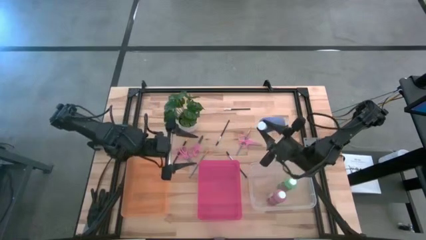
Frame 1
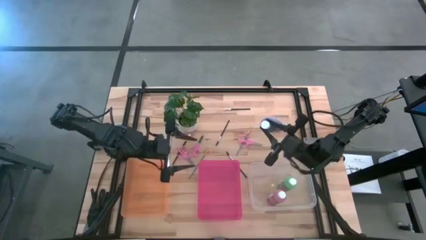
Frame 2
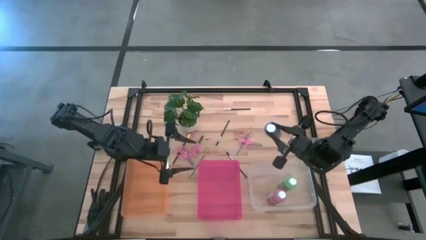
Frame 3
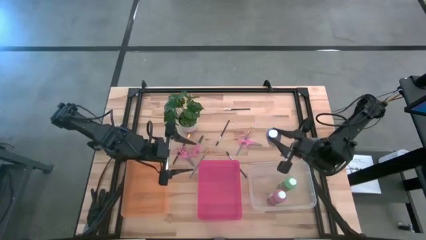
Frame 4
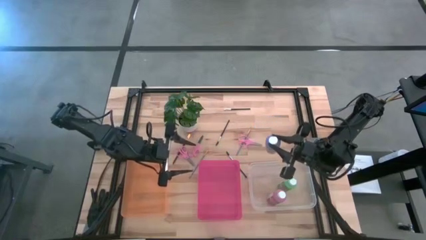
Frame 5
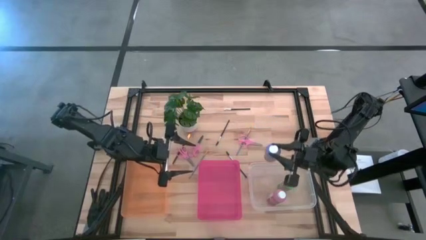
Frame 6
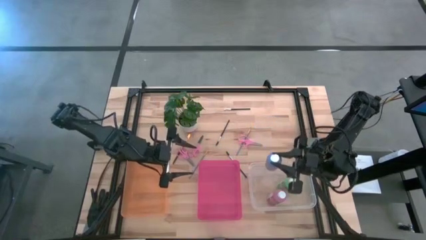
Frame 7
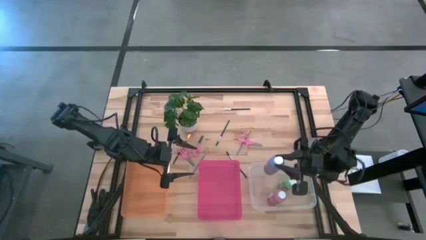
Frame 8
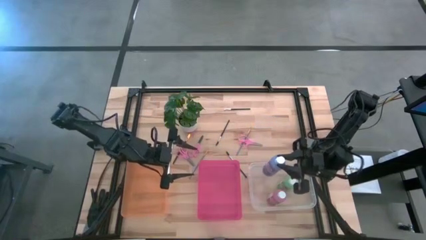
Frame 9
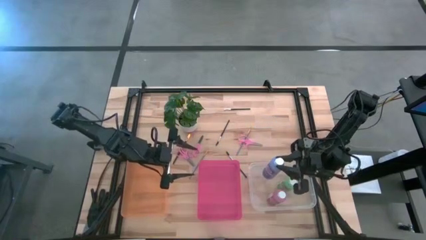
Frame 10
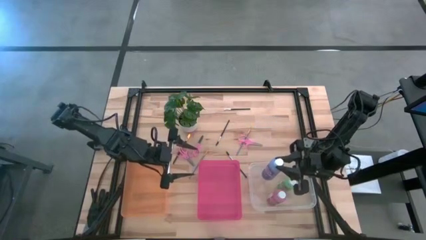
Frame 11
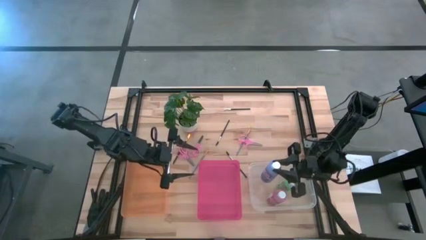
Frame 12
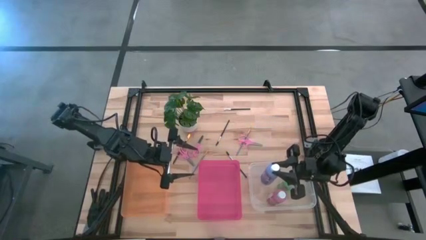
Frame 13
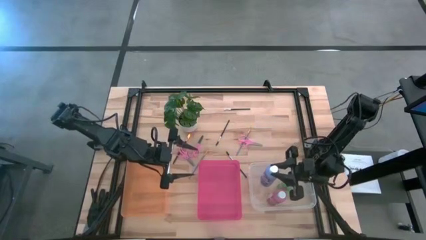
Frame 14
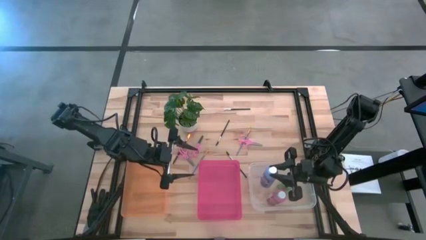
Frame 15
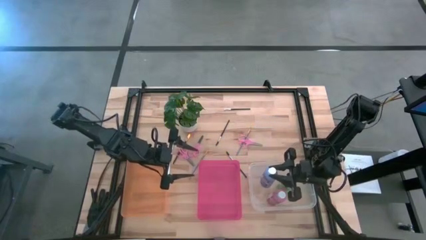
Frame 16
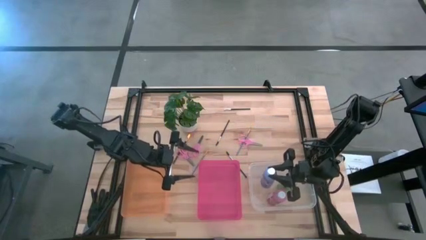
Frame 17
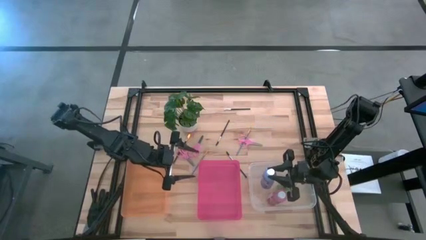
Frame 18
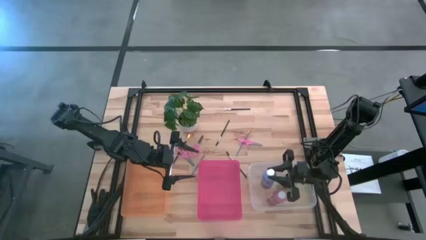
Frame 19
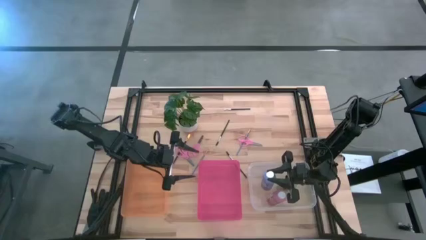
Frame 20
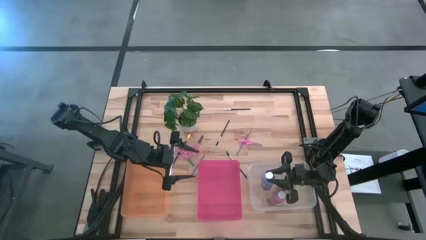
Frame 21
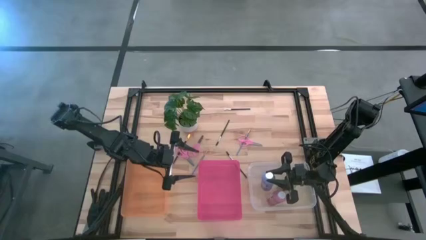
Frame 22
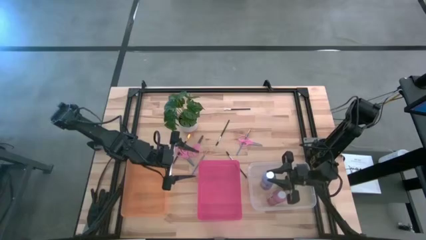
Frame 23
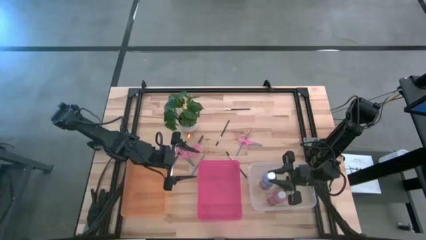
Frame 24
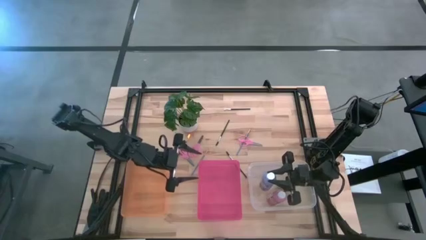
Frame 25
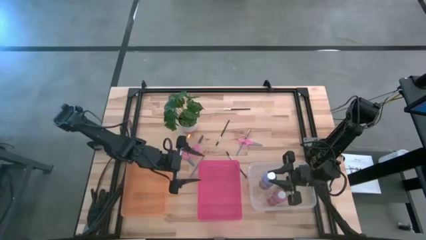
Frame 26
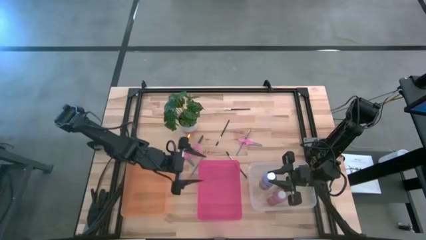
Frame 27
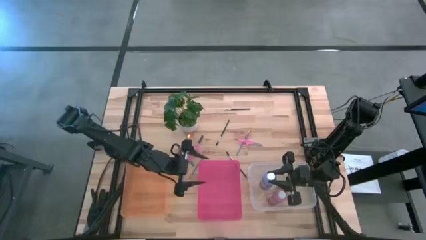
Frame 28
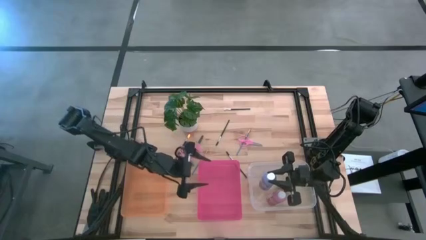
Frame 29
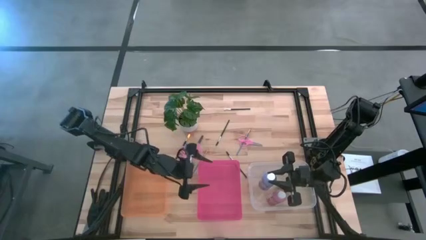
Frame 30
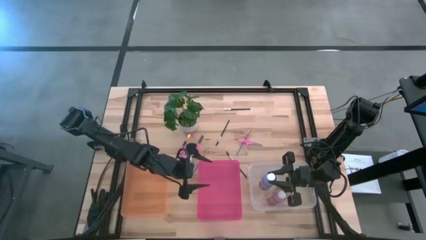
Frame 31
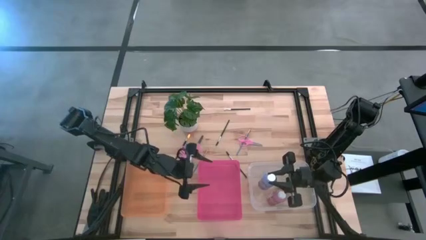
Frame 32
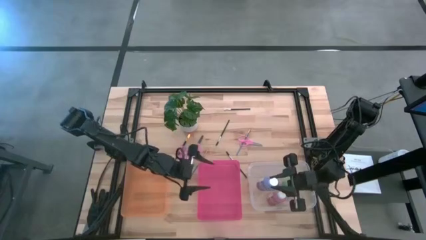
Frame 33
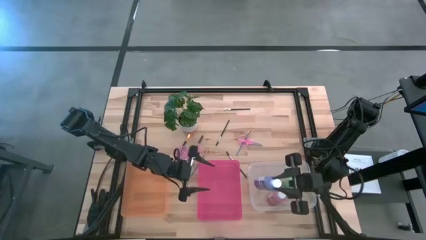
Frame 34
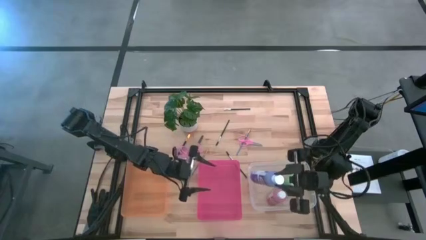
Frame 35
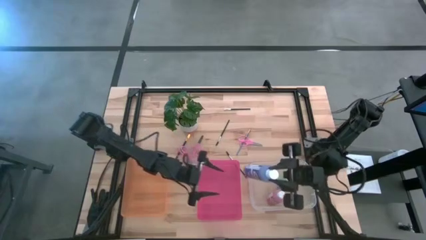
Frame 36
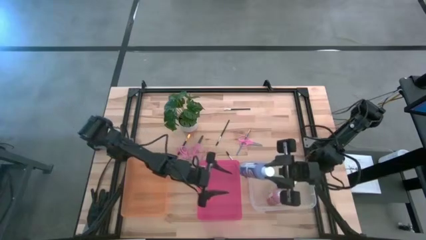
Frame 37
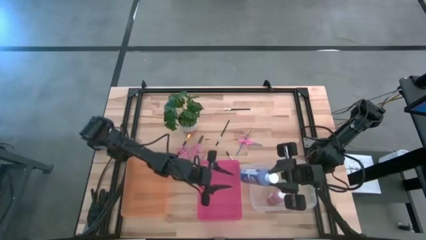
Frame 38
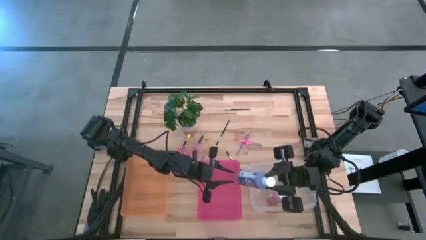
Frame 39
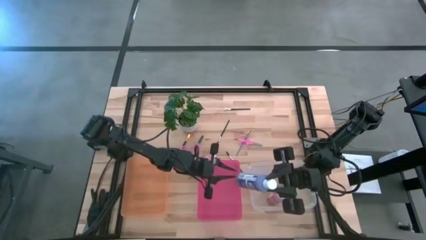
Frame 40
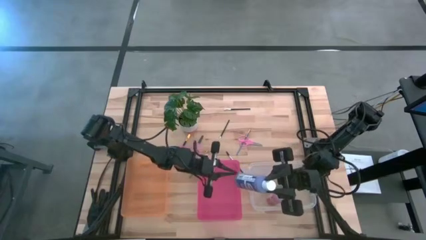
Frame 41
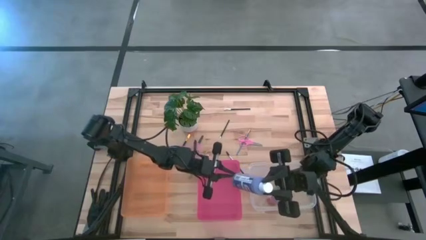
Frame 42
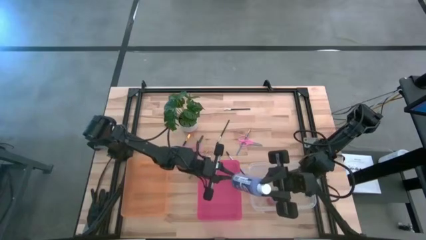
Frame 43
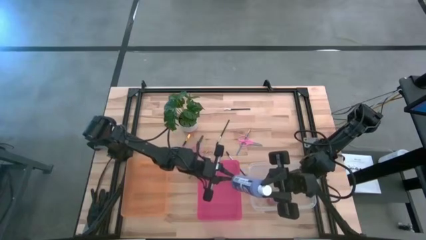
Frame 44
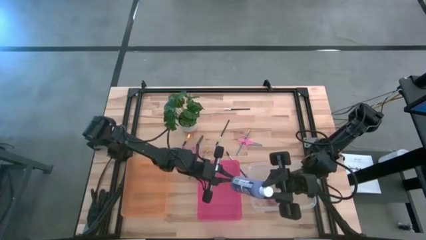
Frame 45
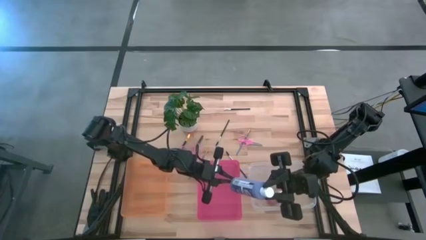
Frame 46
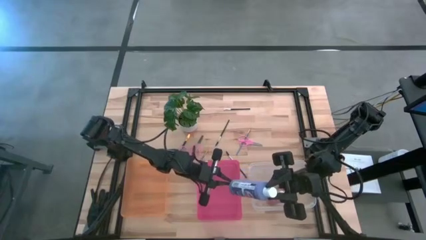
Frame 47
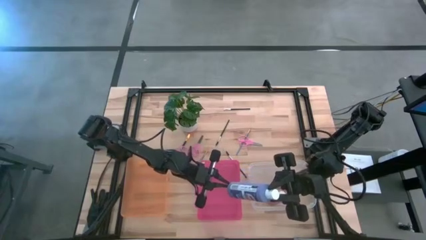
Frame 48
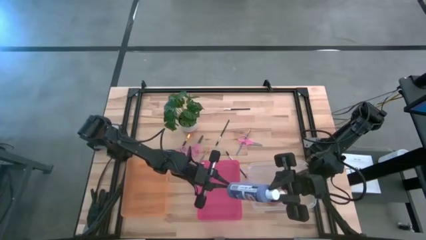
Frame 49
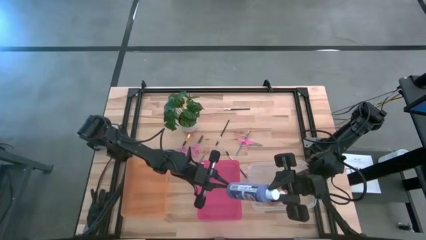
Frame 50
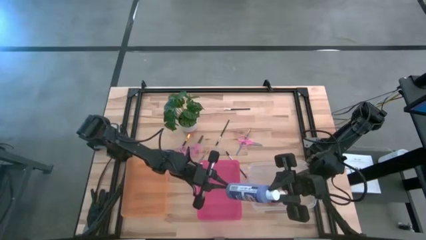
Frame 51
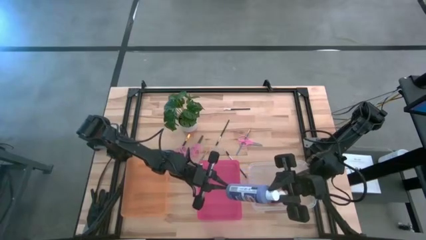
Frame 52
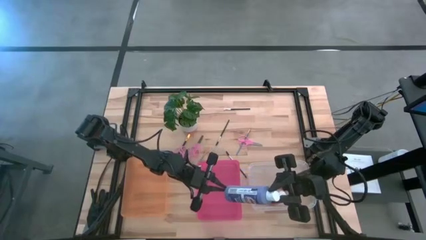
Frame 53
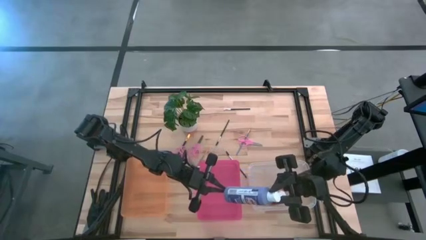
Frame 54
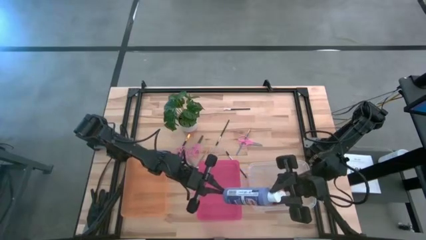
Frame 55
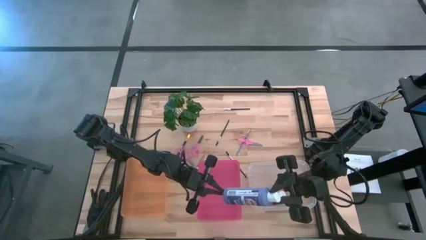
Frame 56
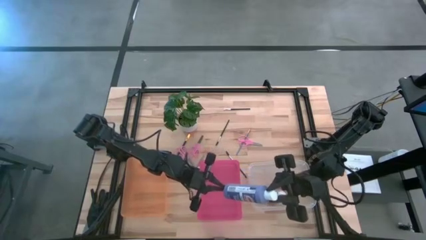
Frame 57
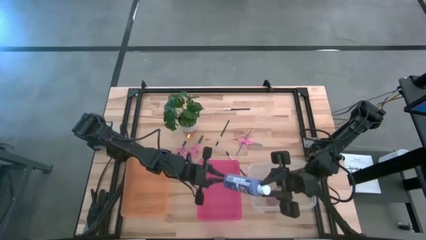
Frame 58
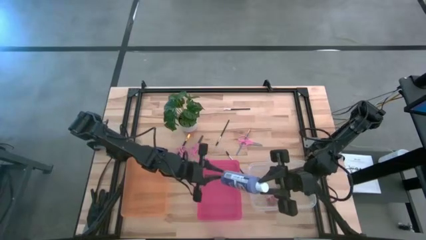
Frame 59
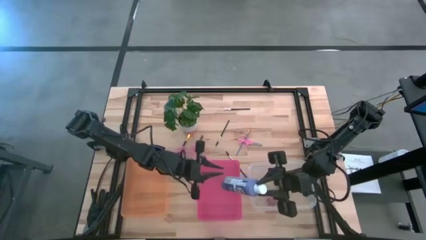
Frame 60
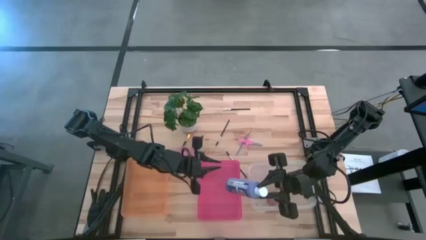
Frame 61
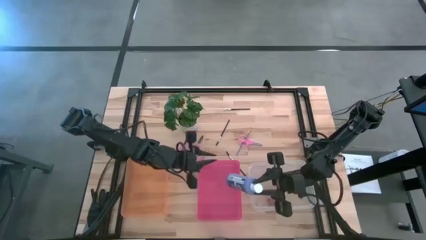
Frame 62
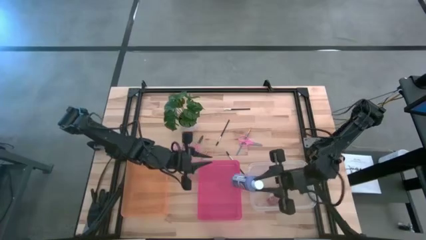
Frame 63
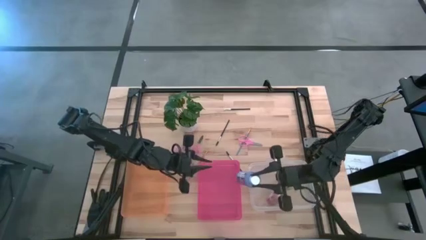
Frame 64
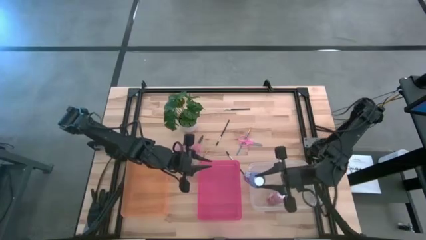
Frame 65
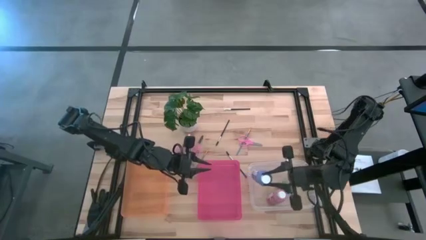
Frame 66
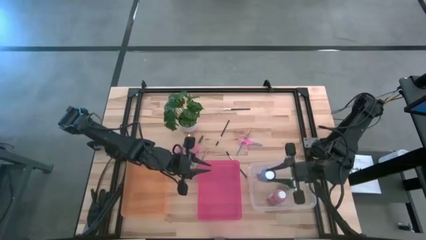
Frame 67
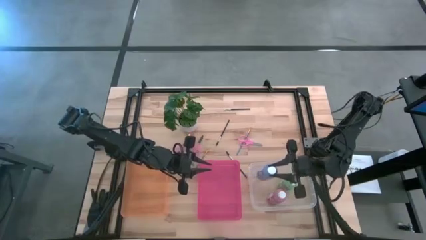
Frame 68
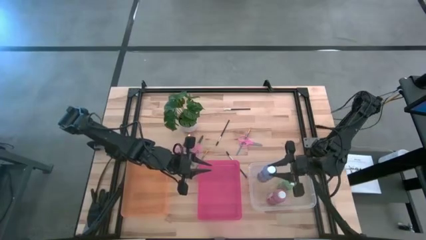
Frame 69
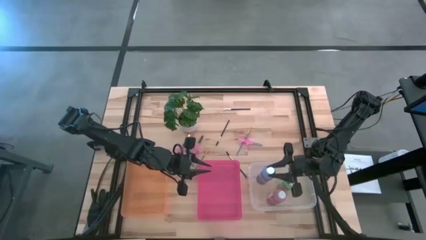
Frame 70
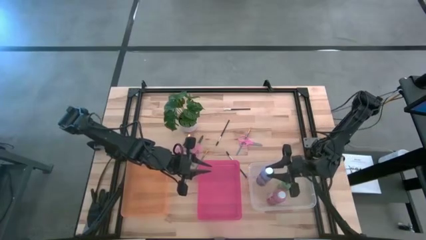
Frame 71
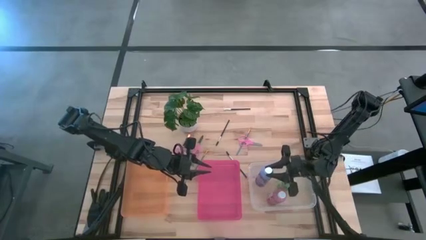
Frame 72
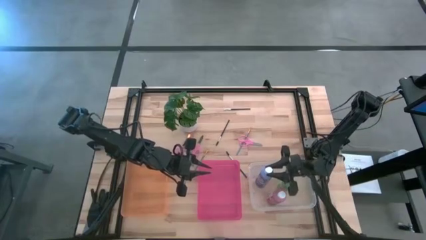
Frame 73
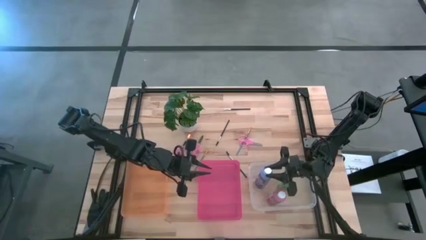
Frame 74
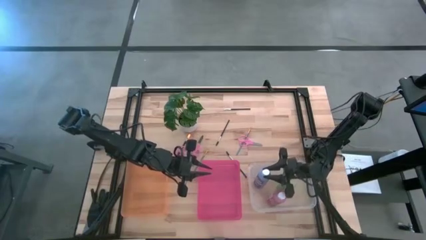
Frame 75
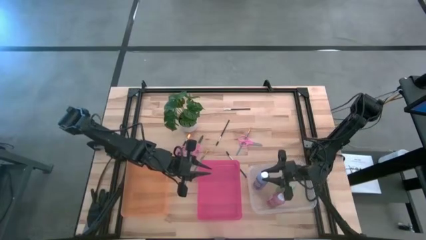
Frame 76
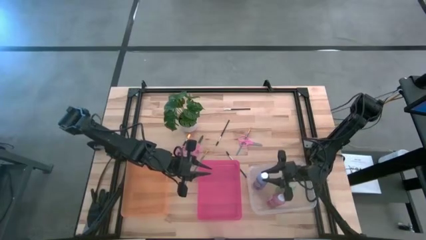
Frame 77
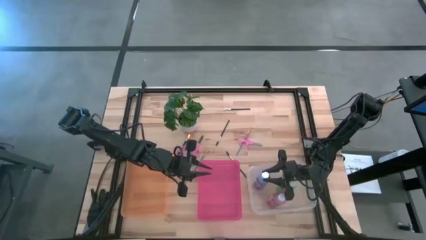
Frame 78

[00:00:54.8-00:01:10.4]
Task: Pick & Place Paint Supplies
Put the purple paint bottle into the transparent bin
